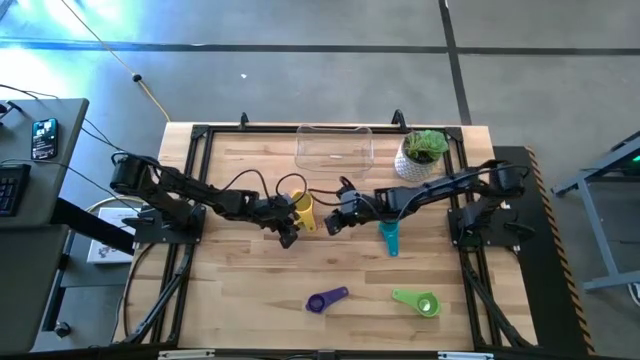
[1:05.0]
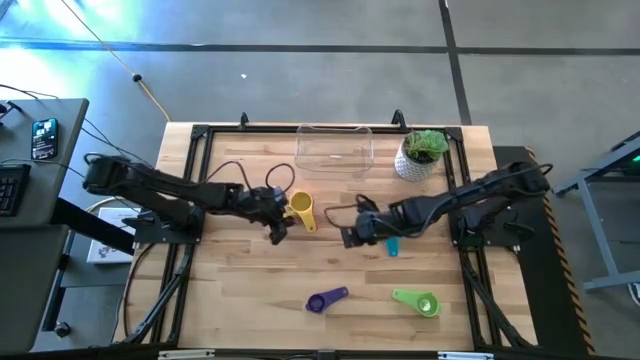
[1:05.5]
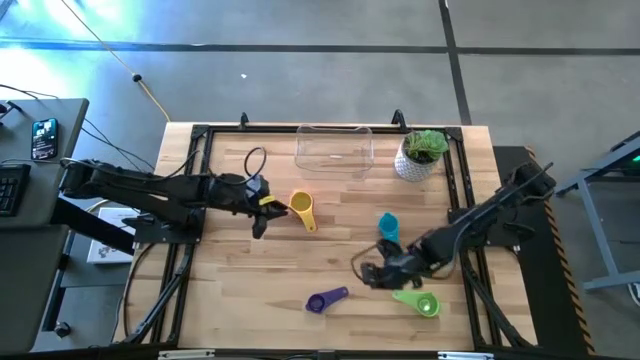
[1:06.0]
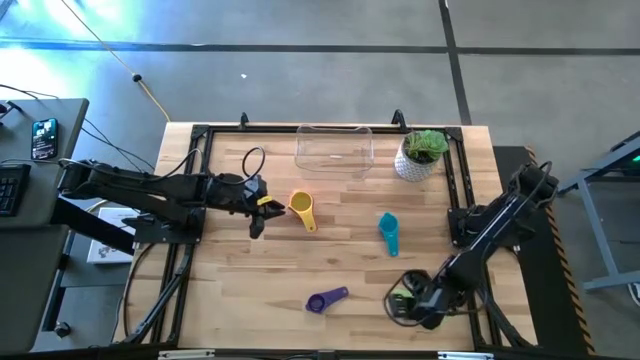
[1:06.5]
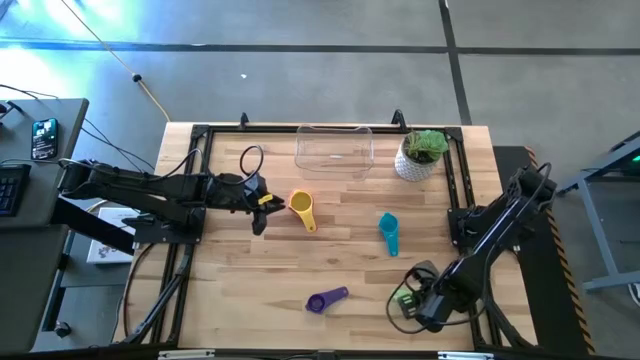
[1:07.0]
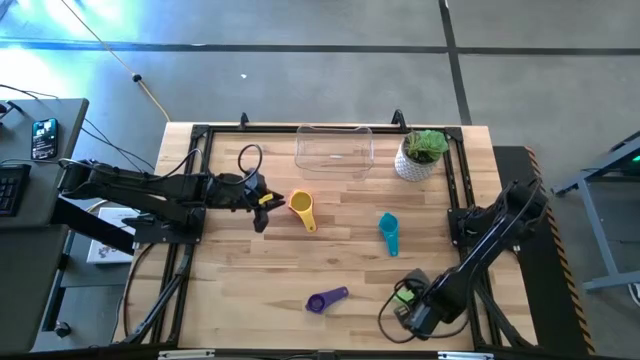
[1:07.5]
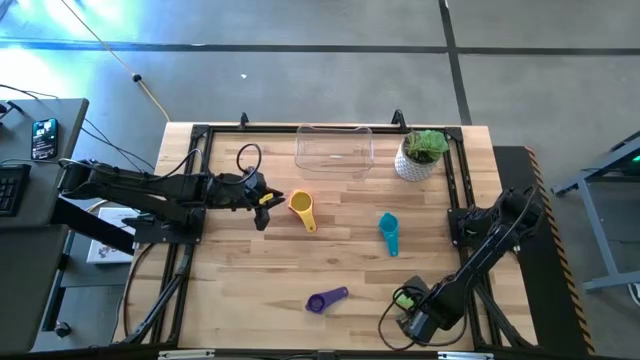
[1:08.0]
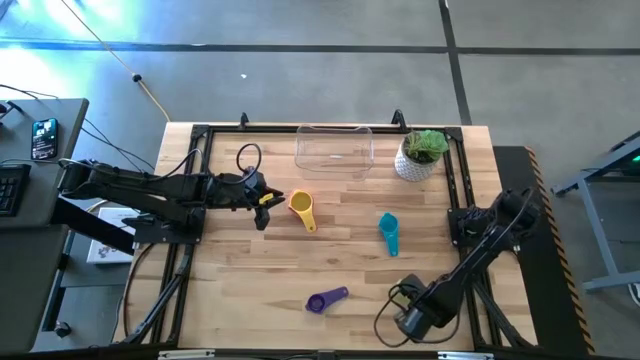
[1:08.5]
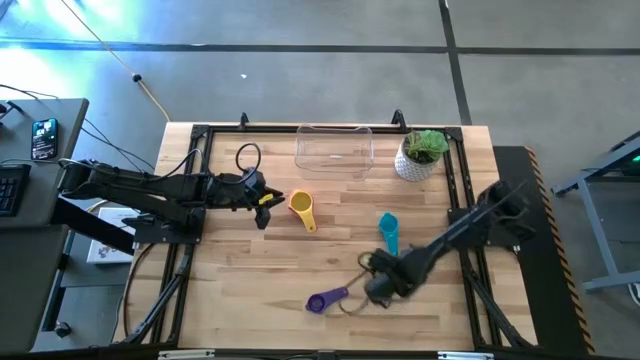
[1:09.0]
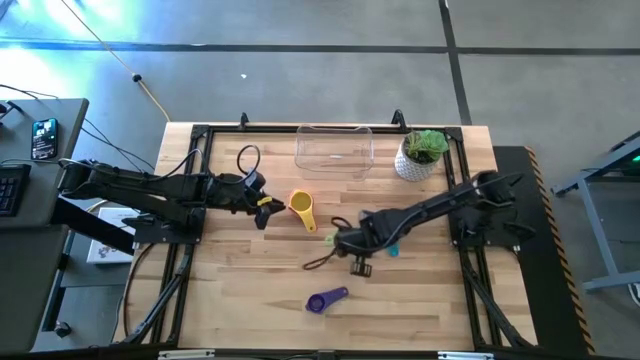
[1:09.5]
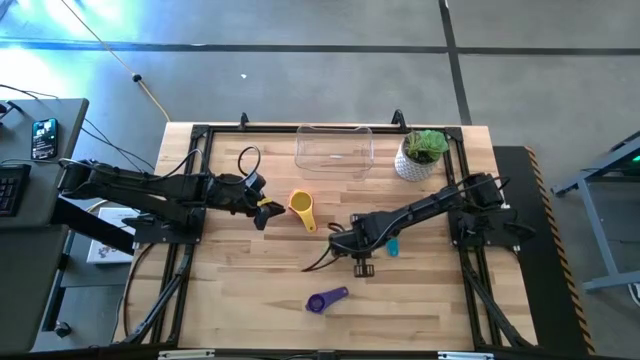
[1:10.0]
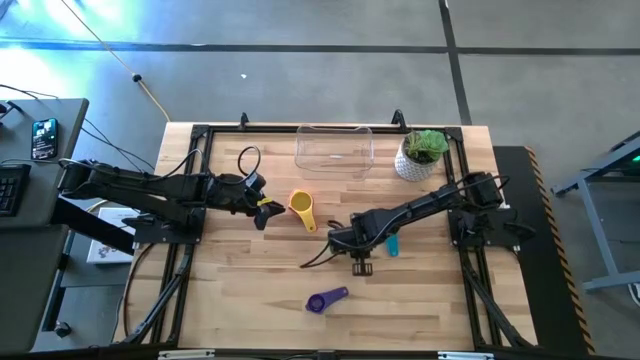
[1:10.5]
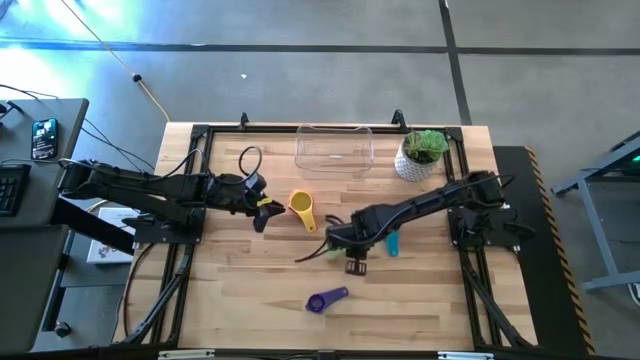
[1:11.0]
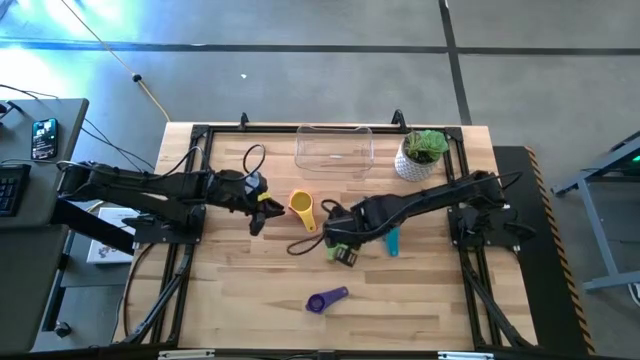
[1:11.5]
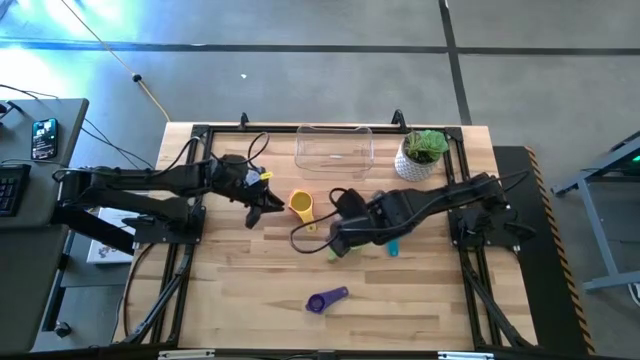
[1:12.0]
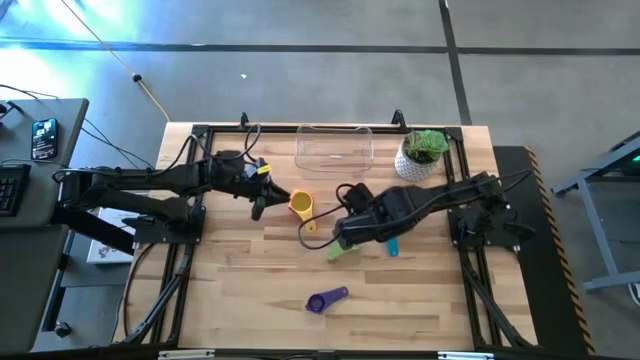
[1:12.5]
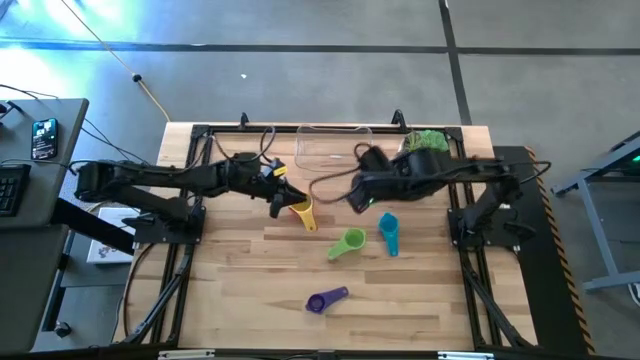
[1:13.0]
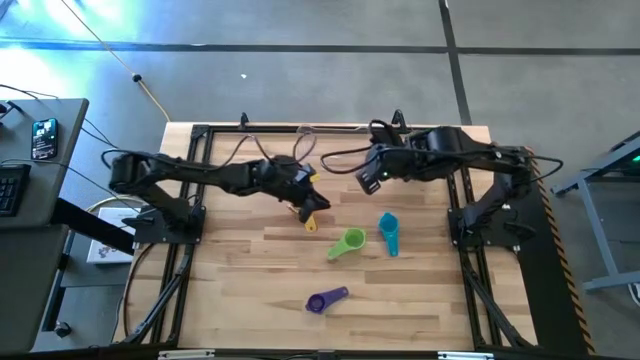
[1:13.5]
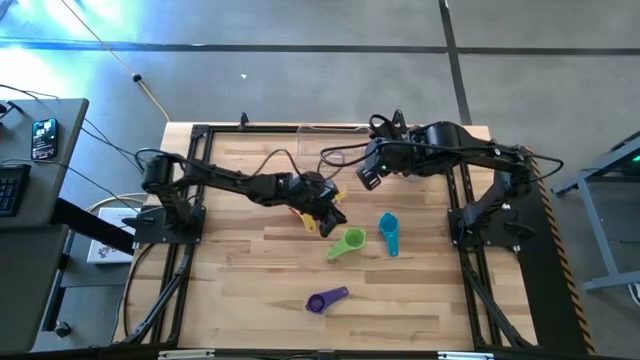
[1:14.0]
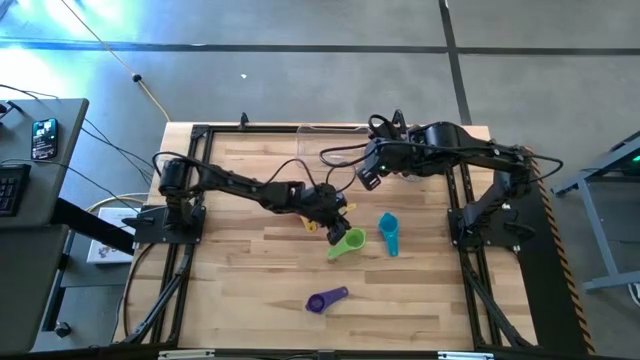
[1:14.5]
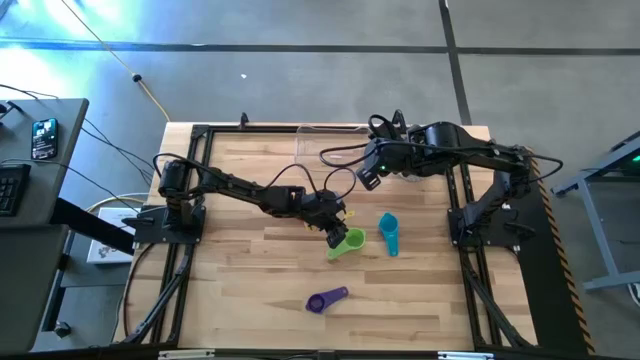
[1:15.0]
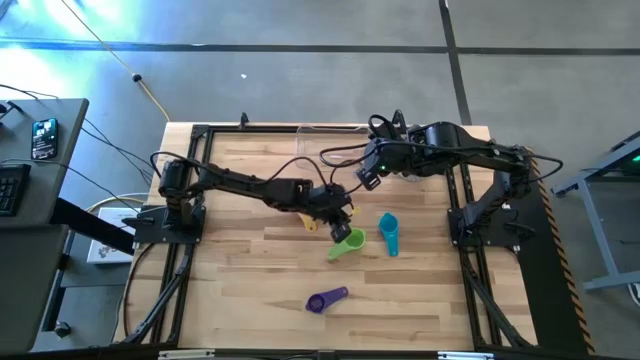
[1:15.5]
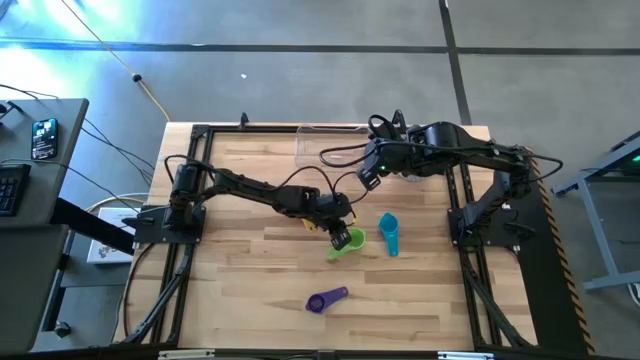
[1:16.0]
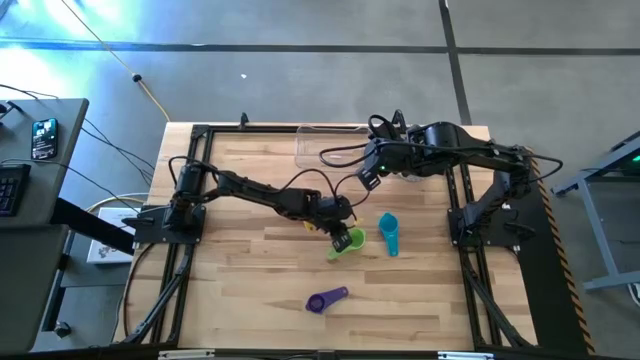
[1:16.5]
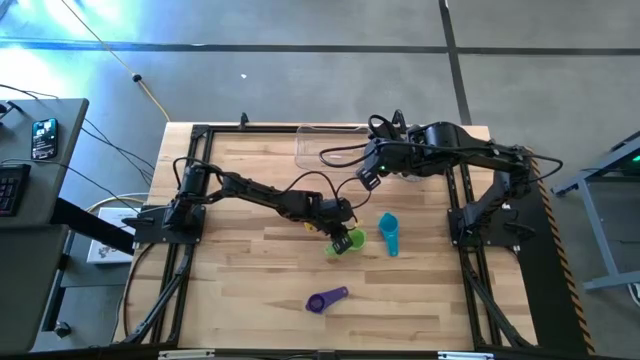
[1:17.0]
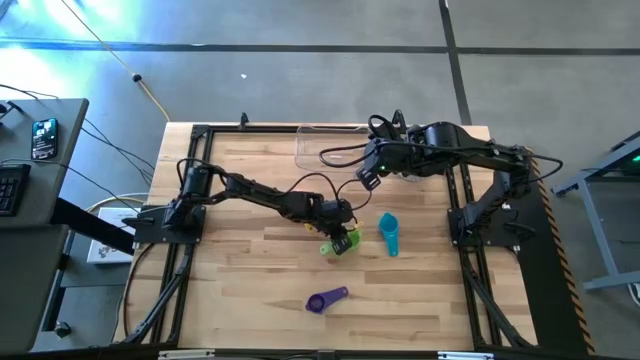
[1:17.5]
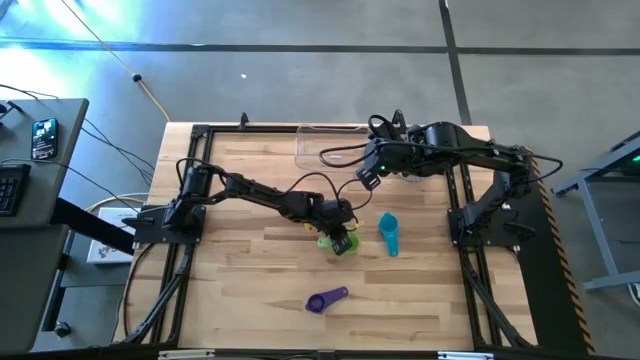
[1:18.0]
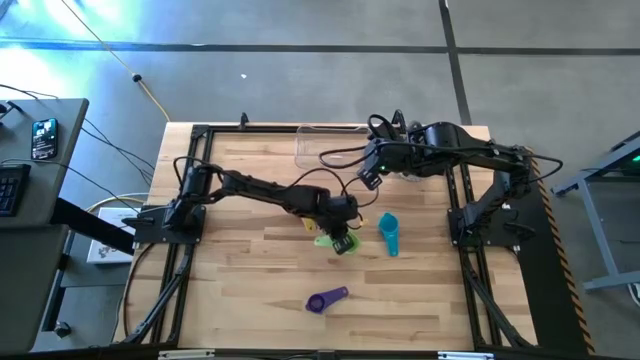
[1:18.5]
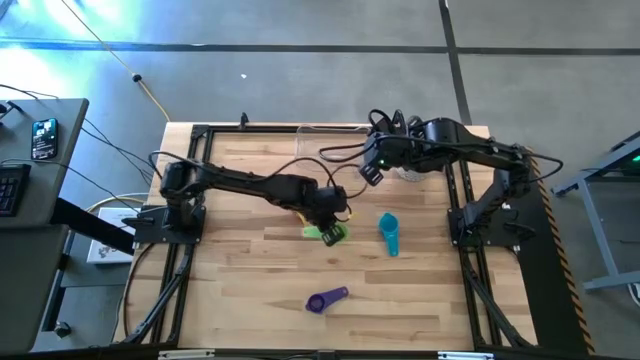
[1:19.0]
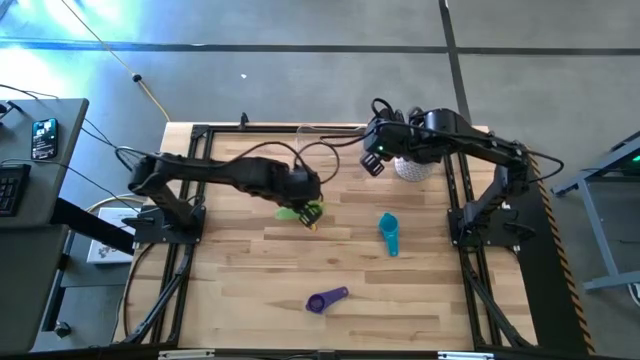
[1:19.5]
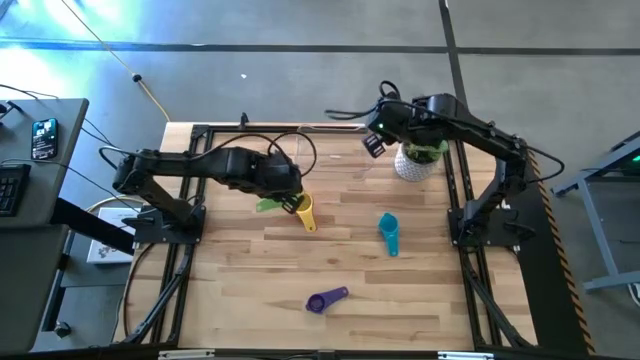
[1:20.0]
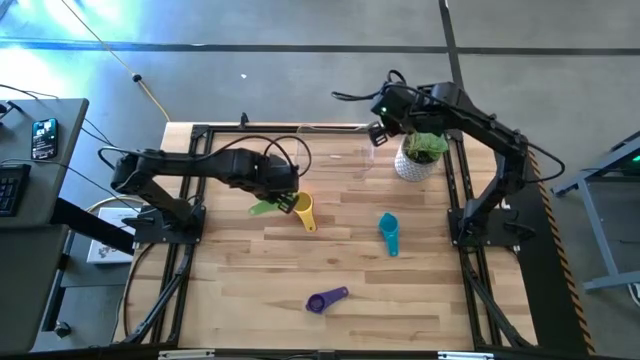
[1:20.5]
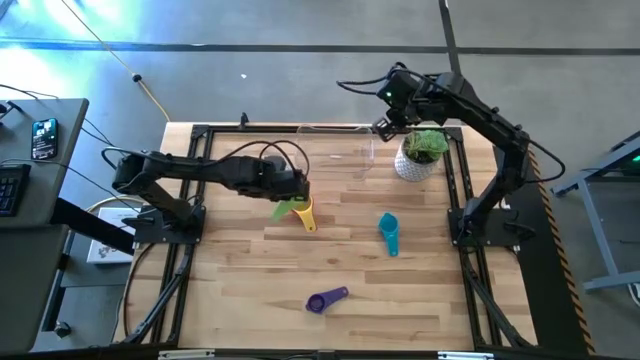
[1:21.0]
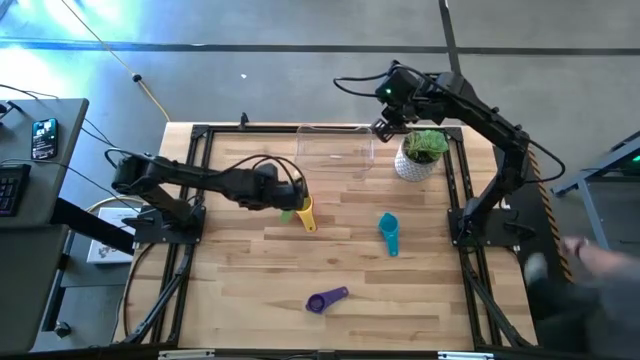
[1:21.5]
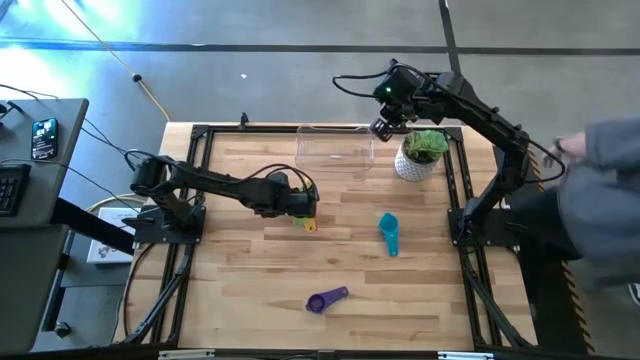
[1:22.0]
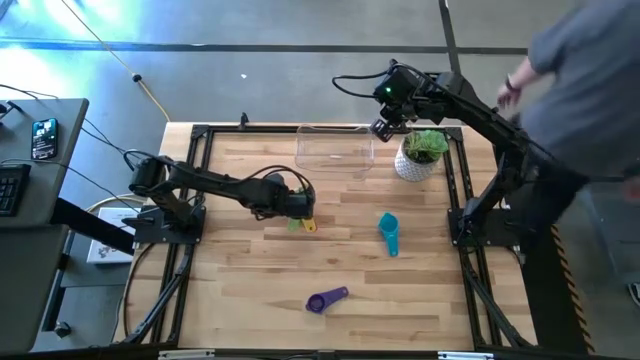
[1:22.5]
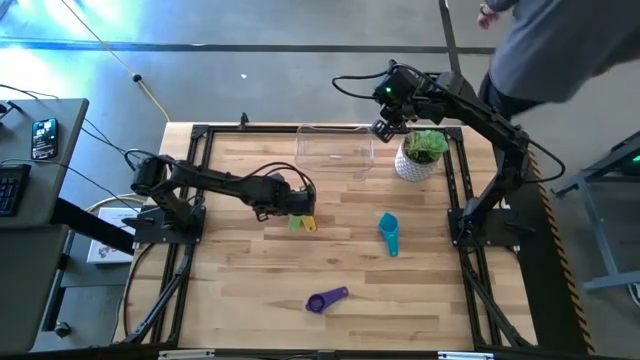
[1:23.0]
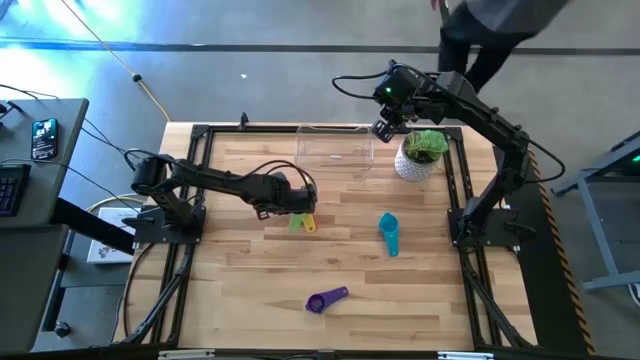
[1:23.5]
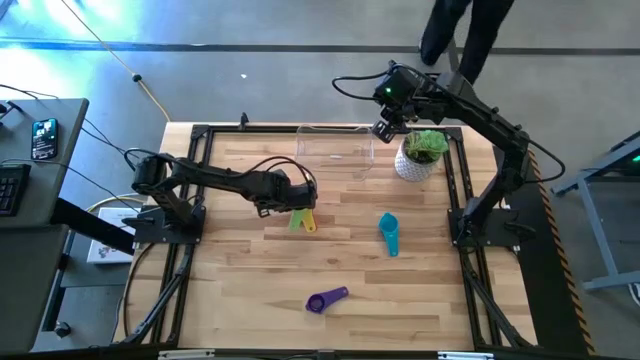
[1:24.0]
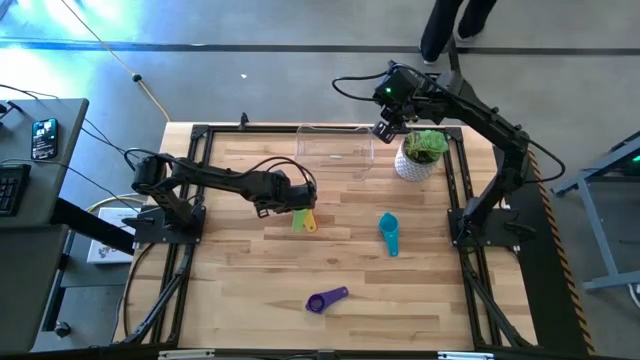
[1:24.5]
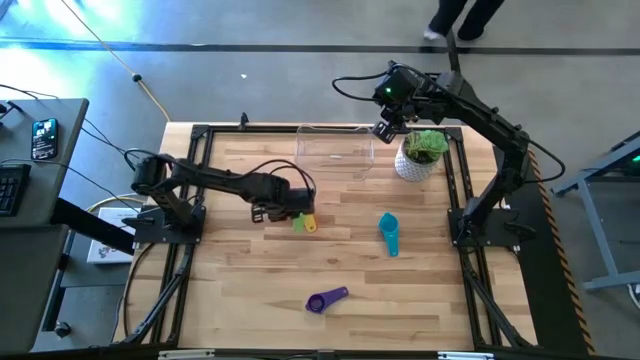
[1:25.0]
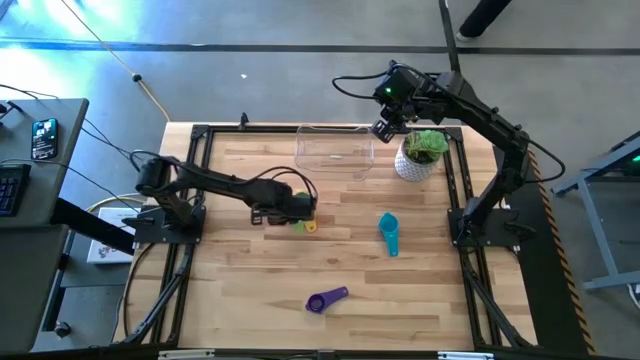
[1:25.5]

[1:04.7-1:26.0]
Task: Nest measuring cups in basket
Stack the green measuring cup on the top of the yellow measuring cup
